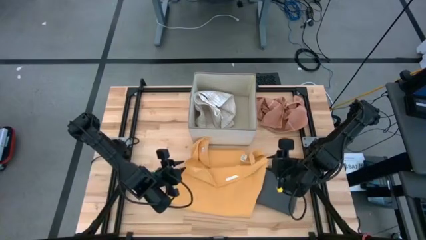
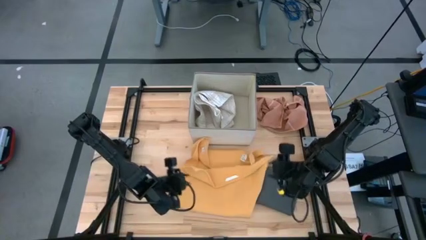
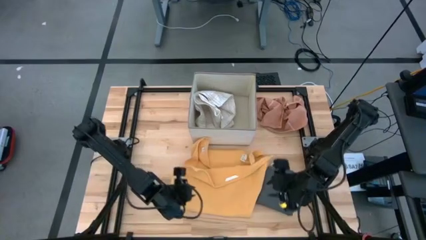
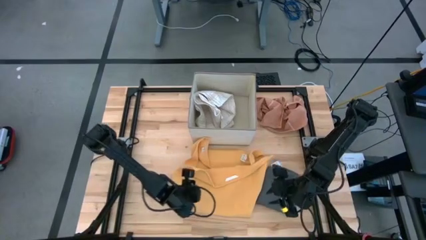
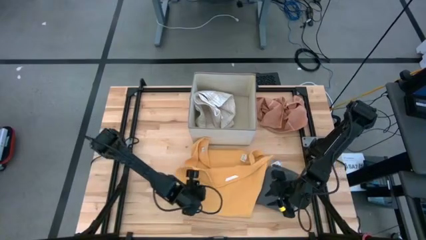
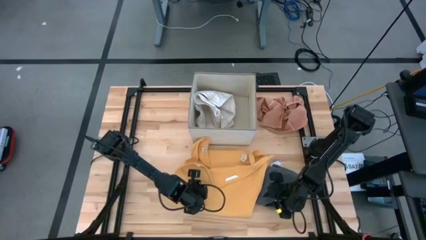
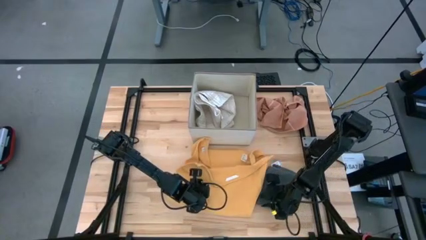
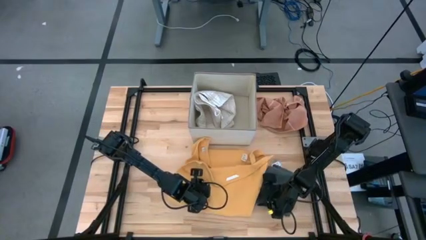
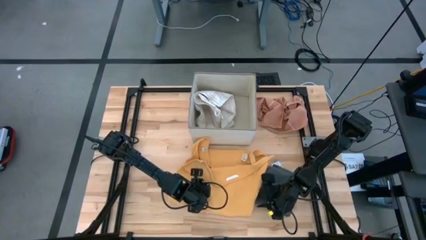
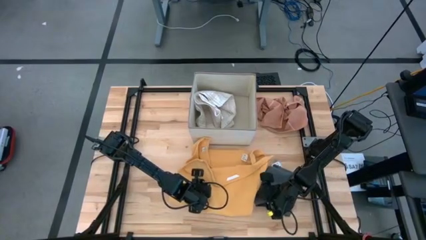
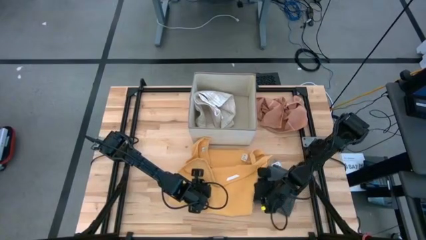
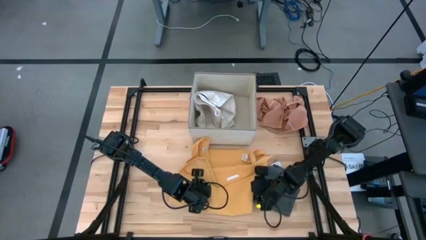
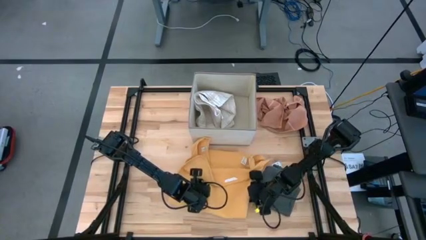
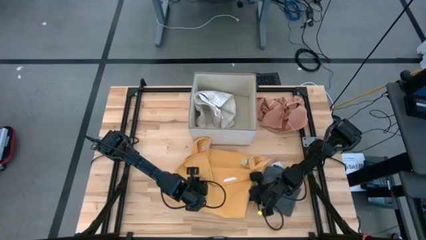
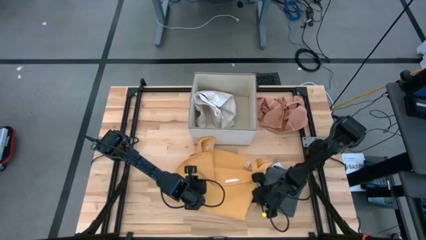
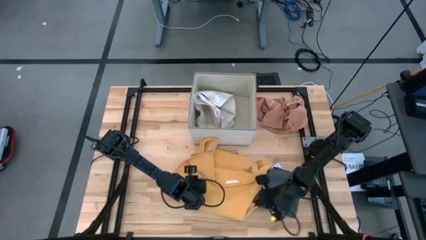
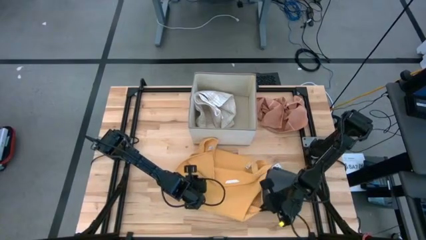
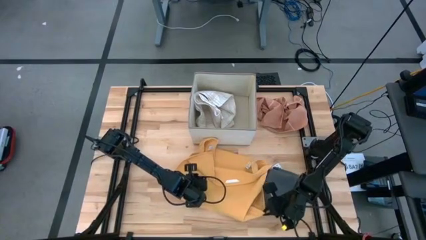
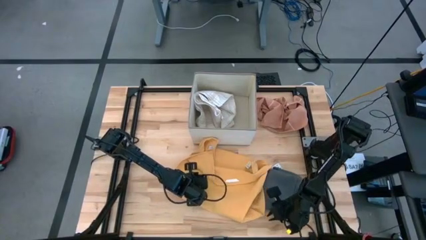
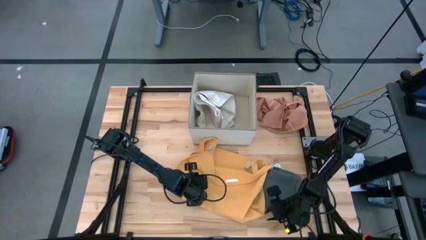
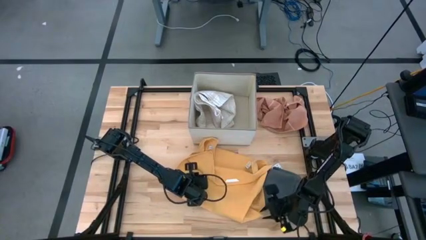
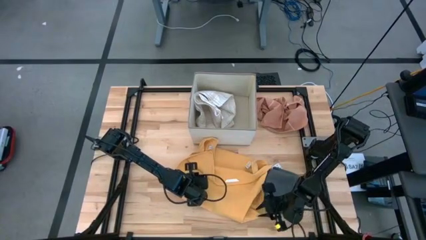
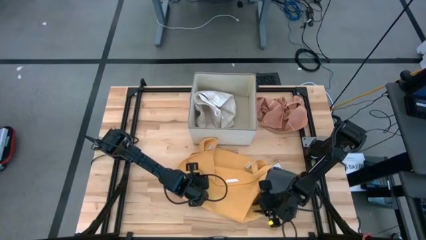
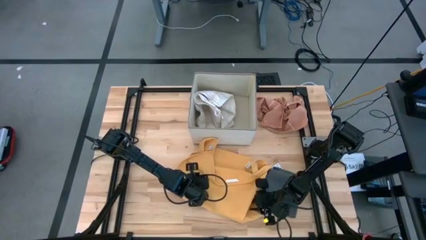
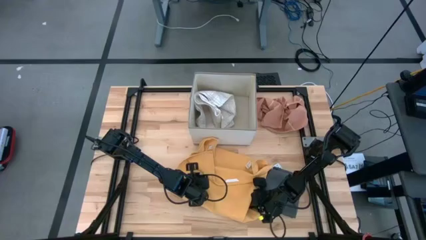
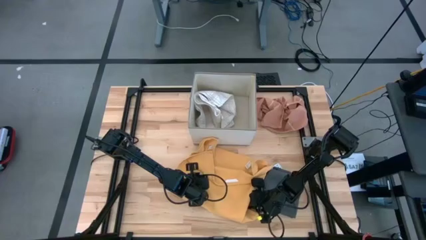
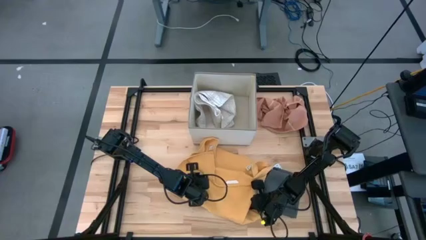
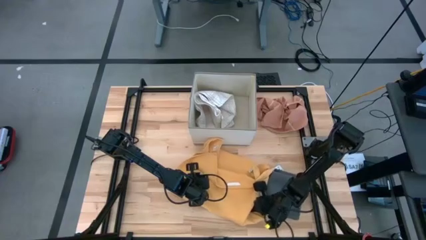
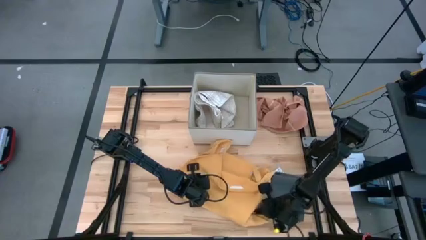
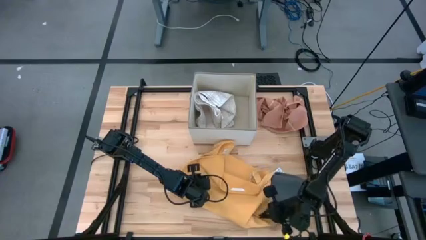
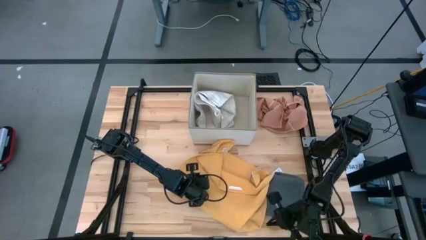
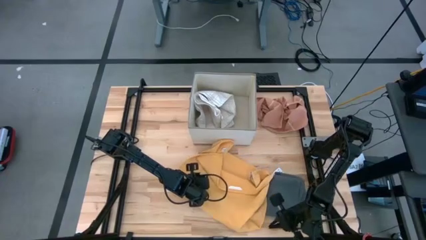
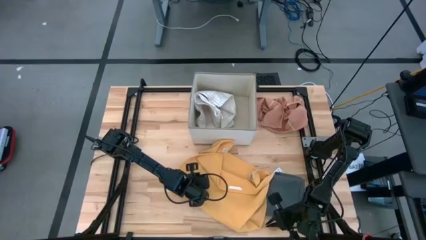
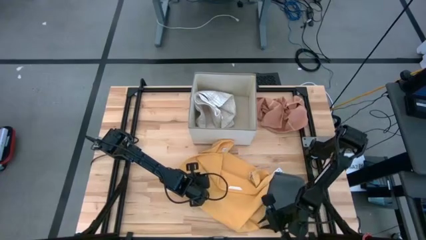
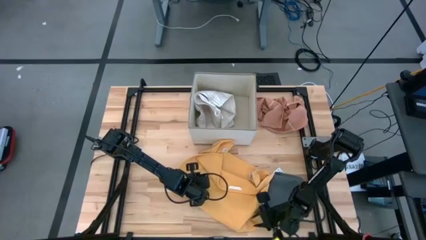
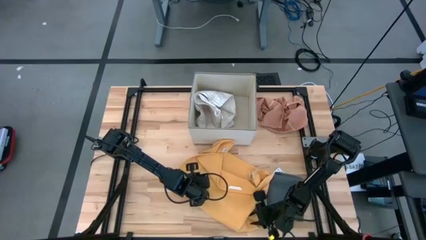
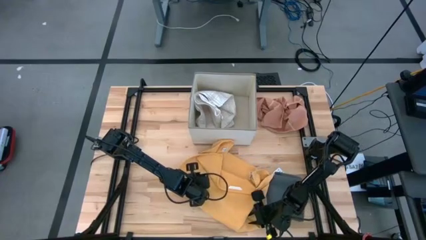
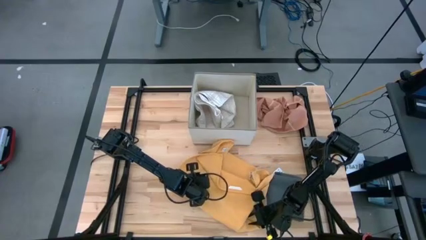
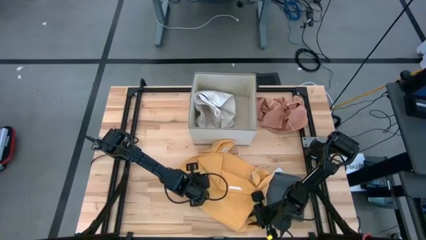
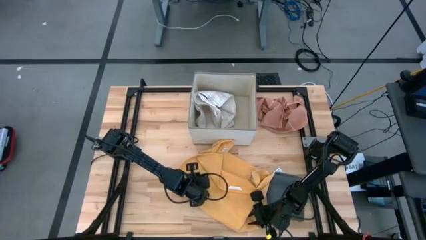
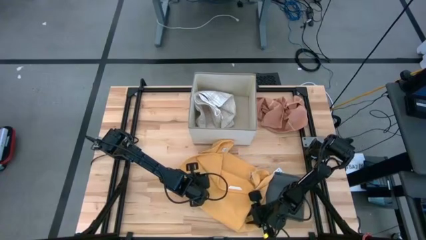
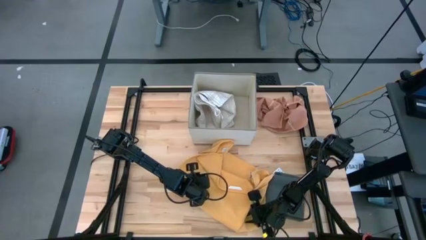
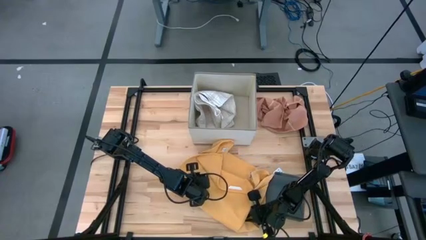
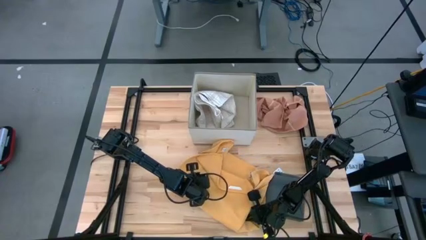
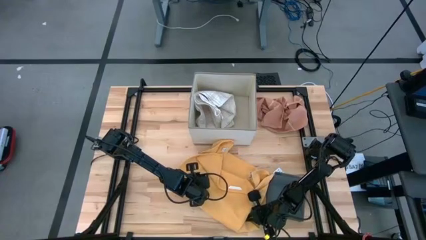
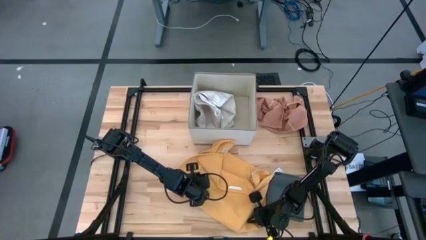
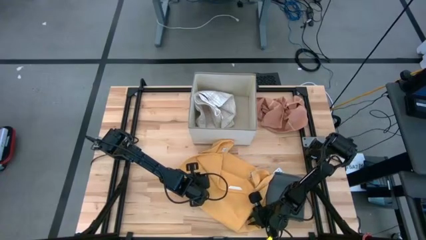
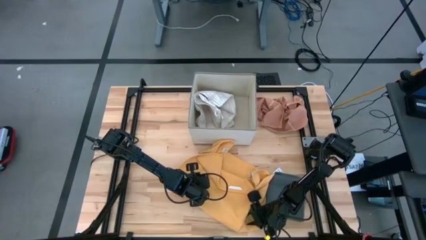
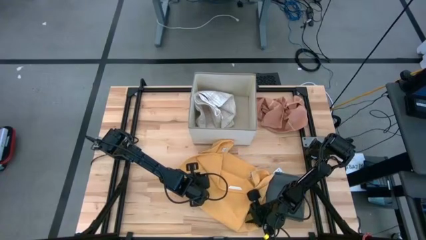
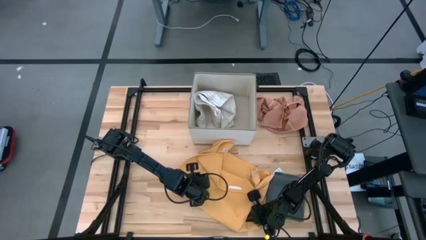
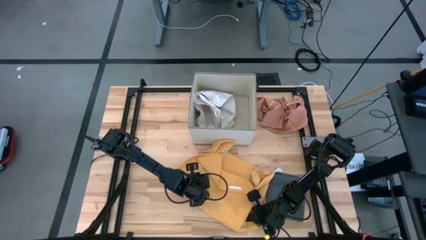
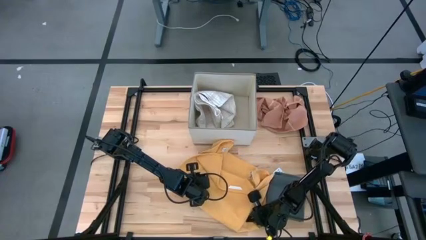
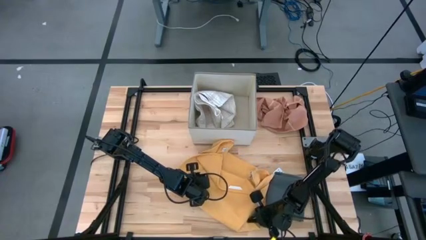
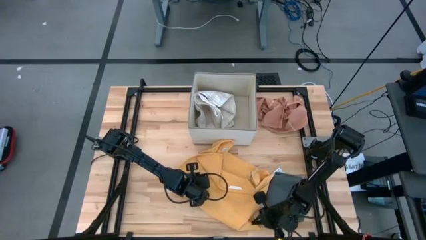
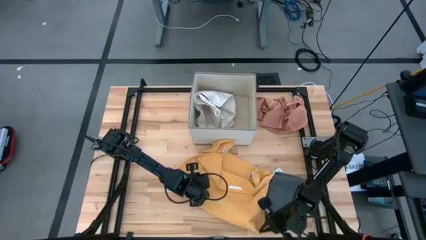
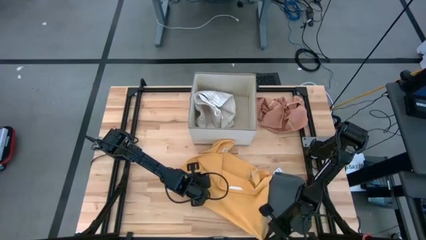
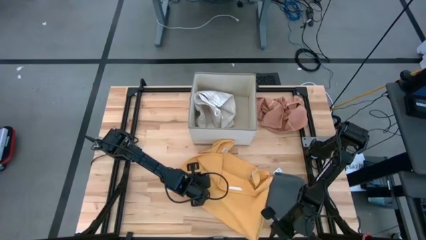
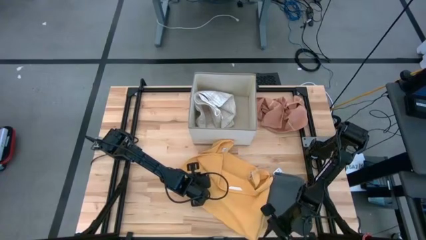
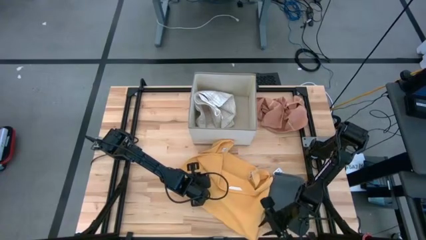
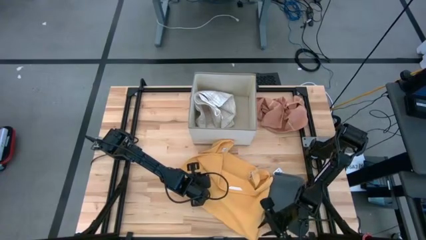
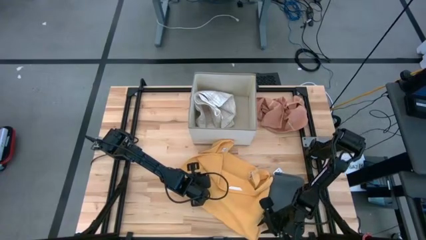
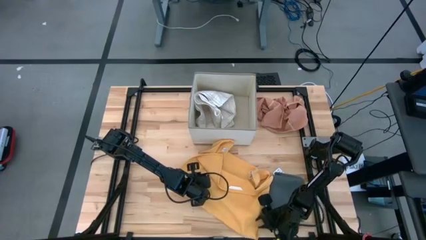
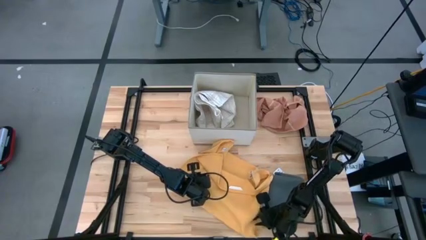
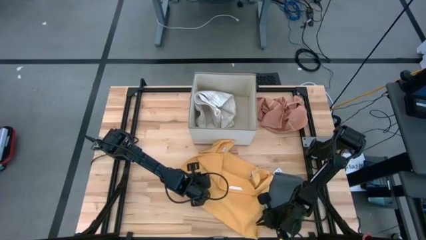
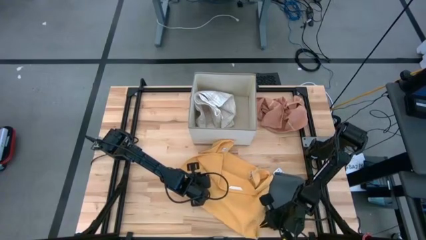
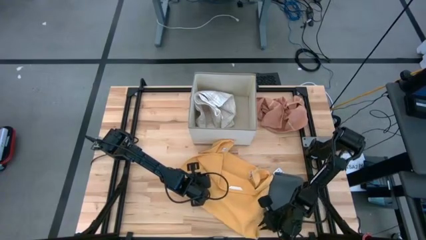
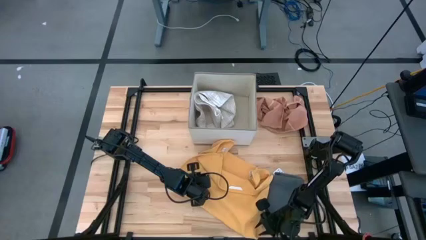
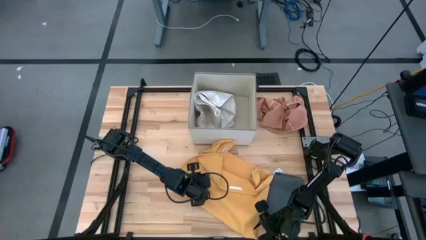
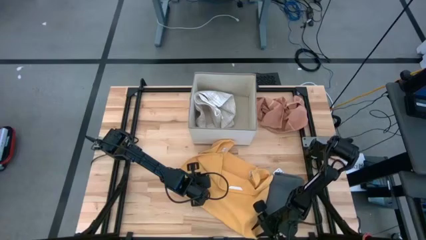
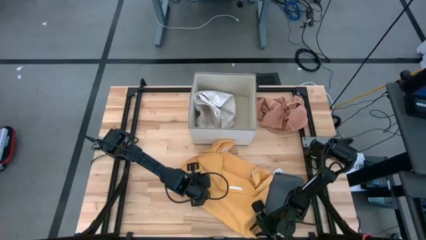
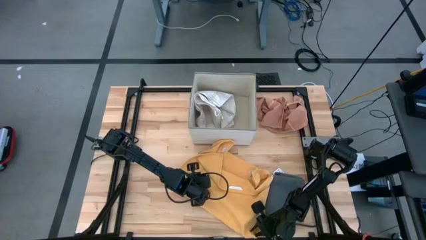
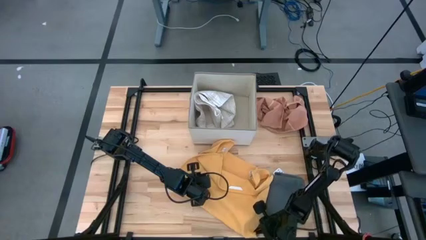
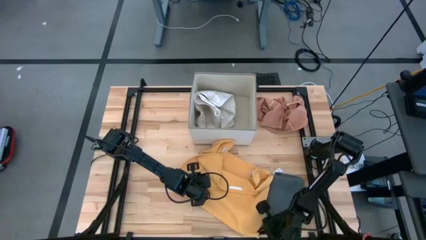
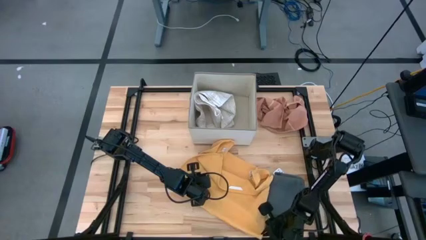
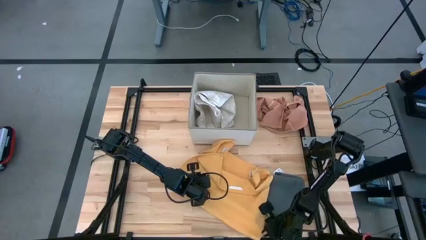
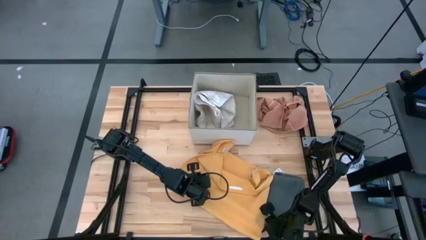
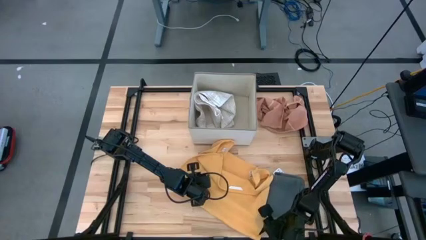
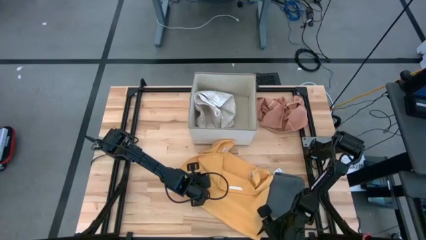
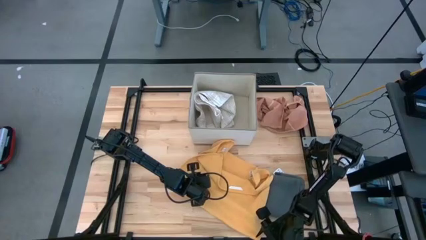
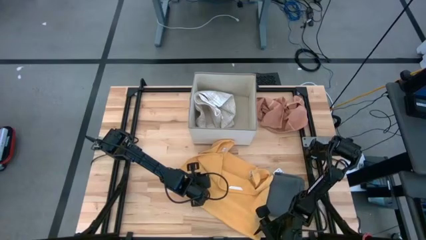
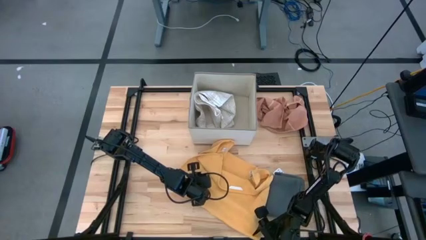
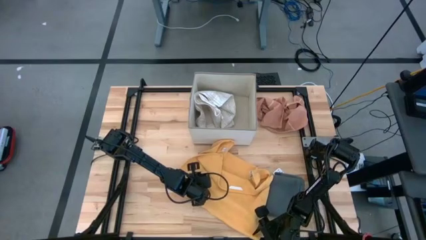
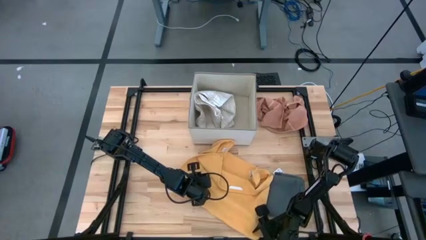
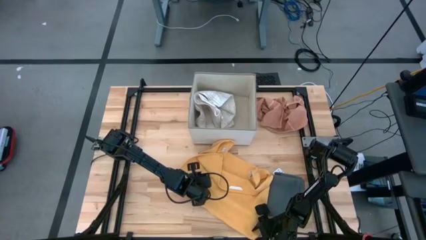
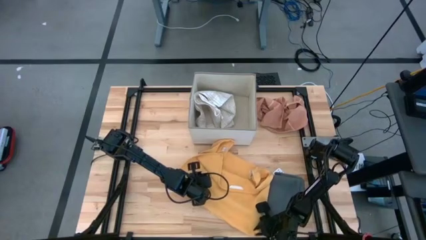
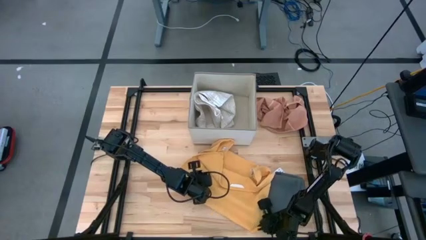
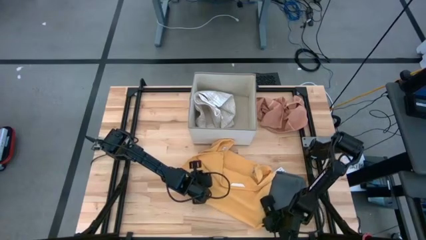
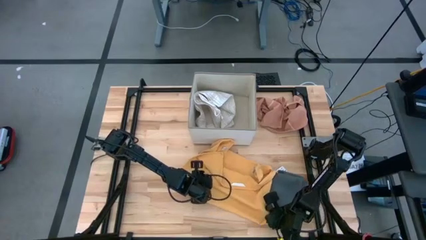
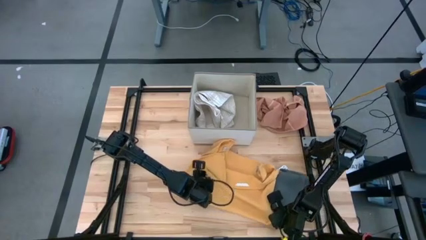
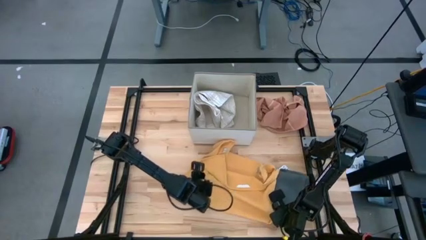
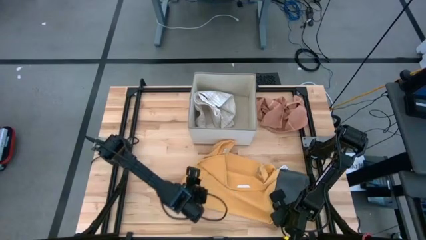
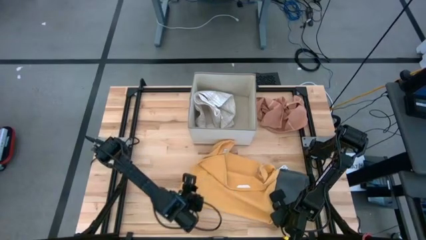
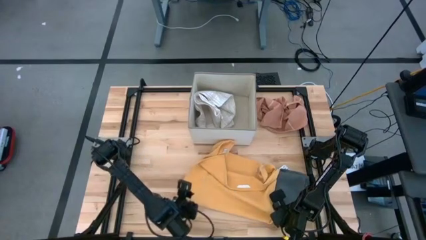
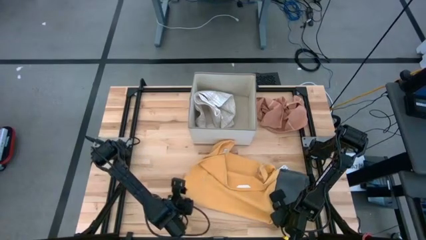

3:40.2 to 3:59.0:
Task: Fold towel
Fold the yellow towel
